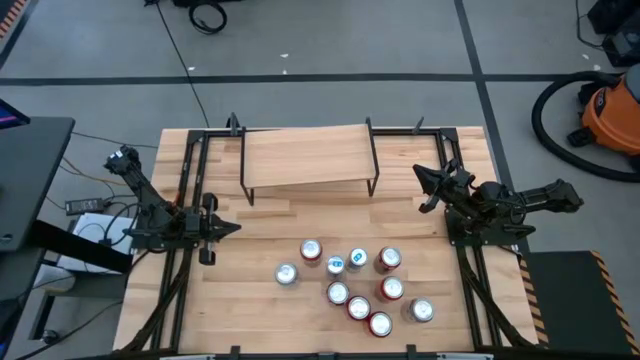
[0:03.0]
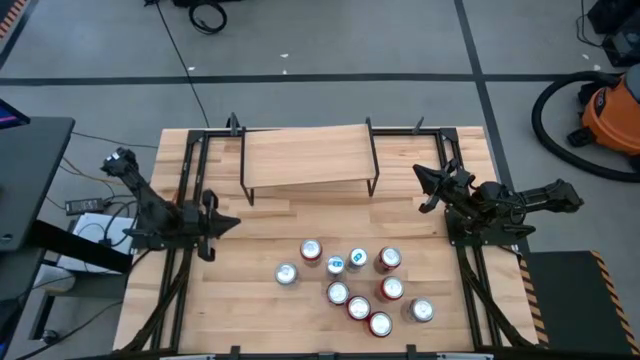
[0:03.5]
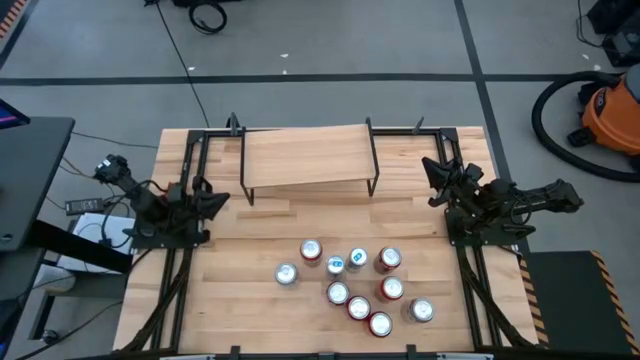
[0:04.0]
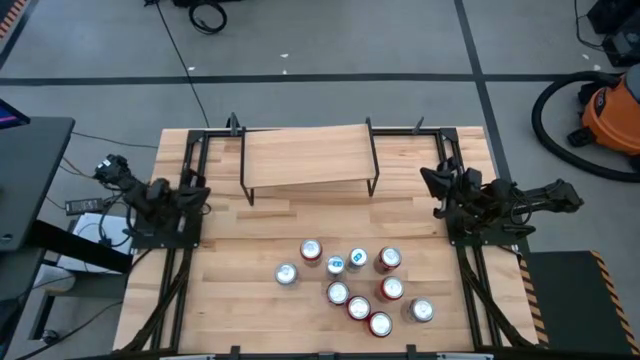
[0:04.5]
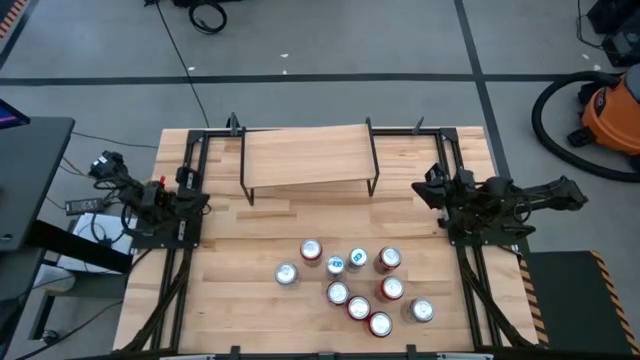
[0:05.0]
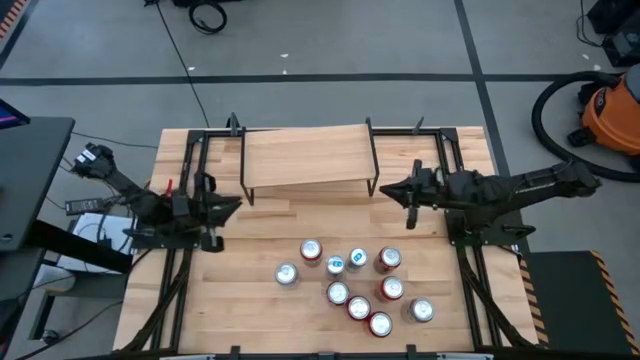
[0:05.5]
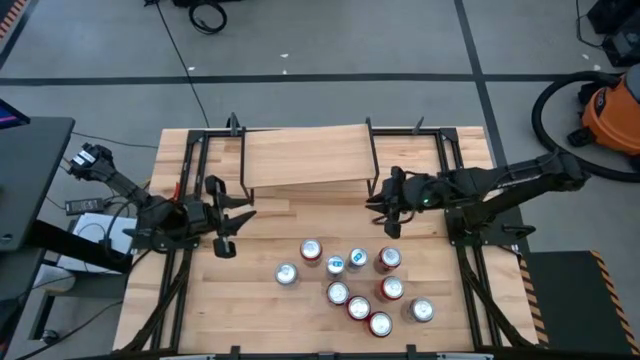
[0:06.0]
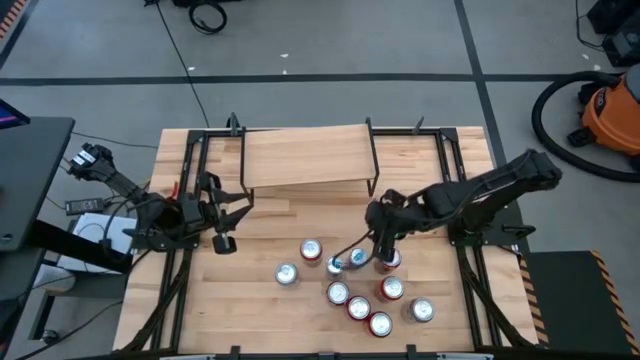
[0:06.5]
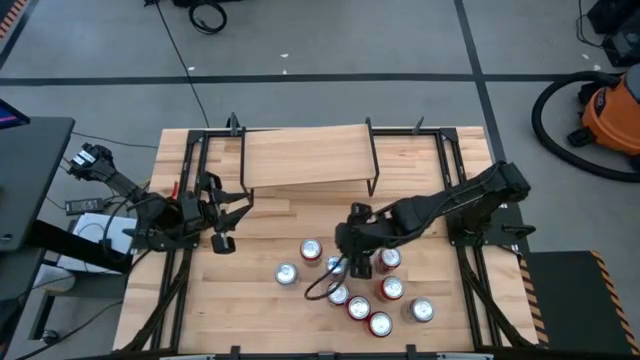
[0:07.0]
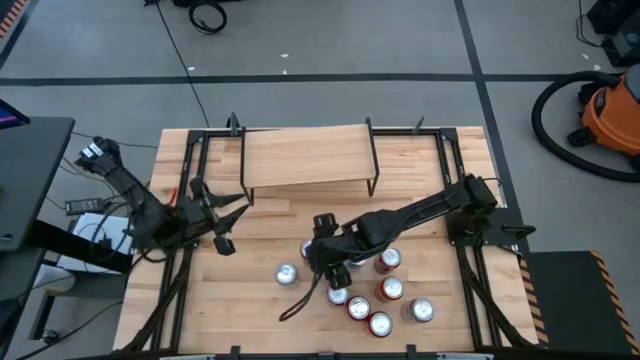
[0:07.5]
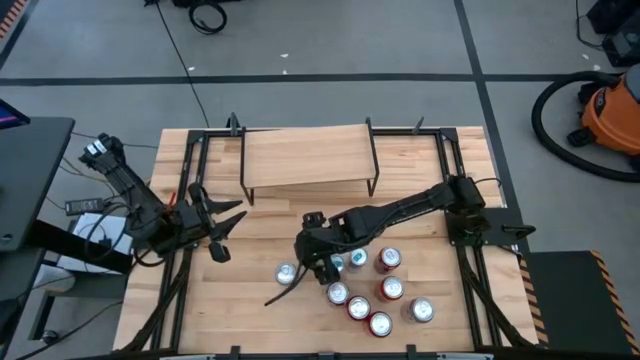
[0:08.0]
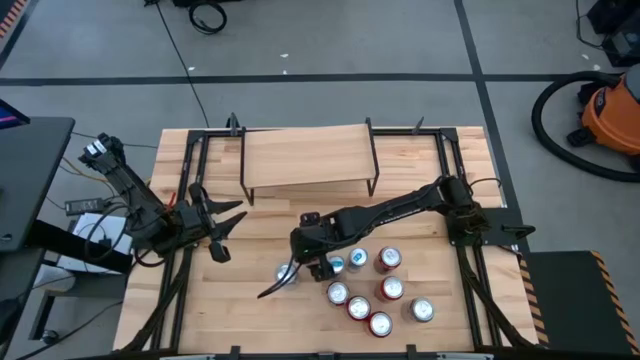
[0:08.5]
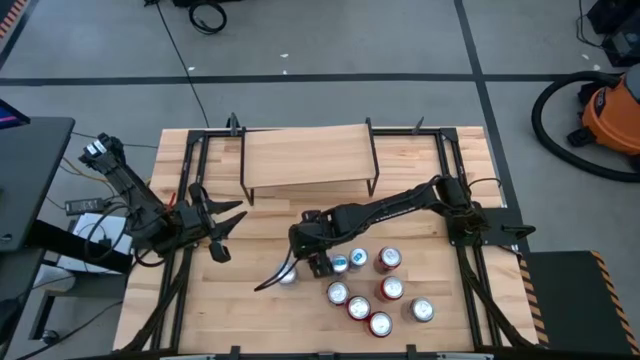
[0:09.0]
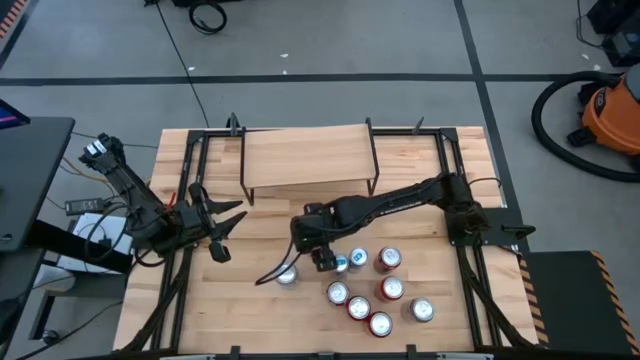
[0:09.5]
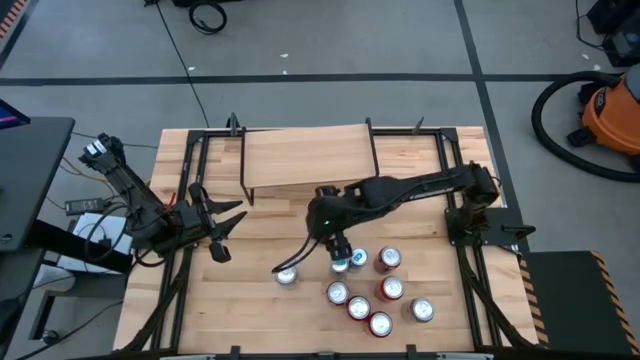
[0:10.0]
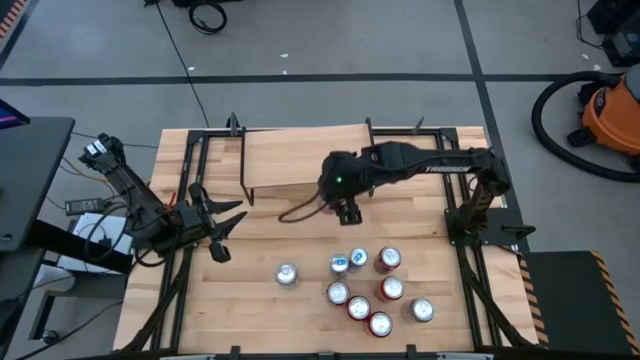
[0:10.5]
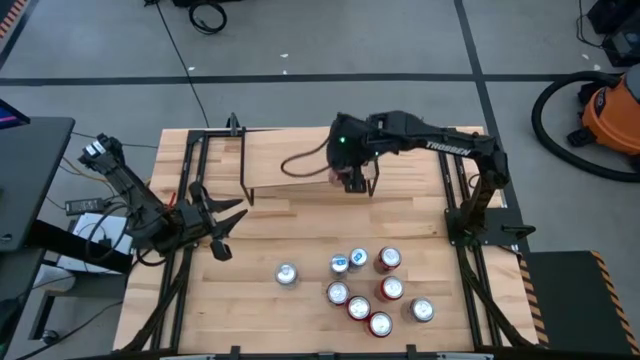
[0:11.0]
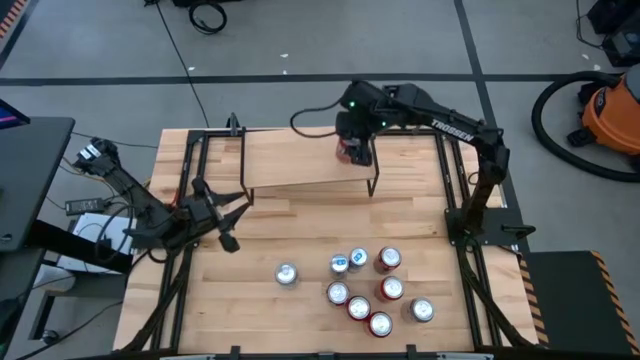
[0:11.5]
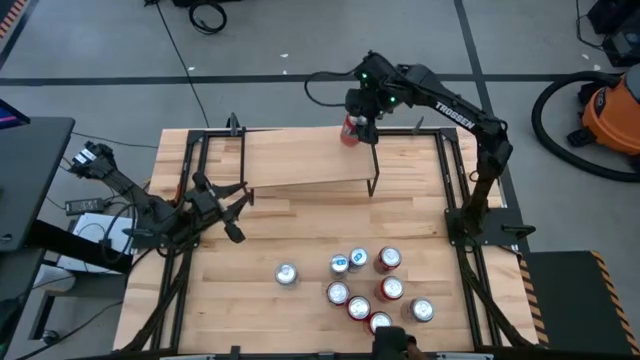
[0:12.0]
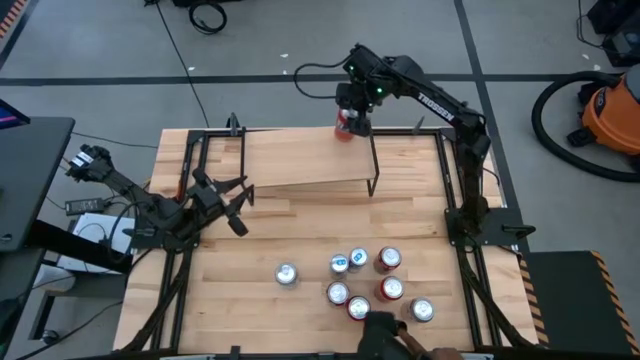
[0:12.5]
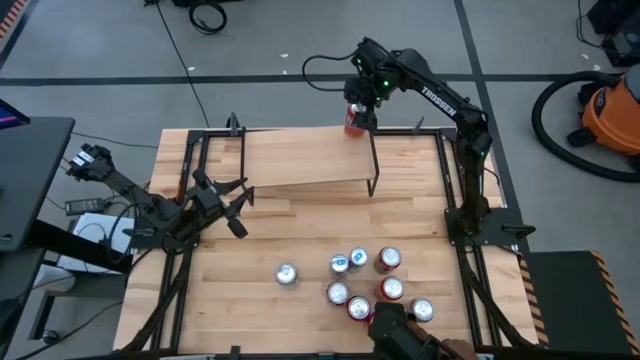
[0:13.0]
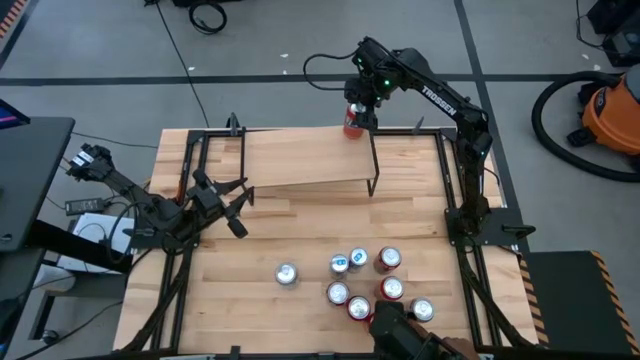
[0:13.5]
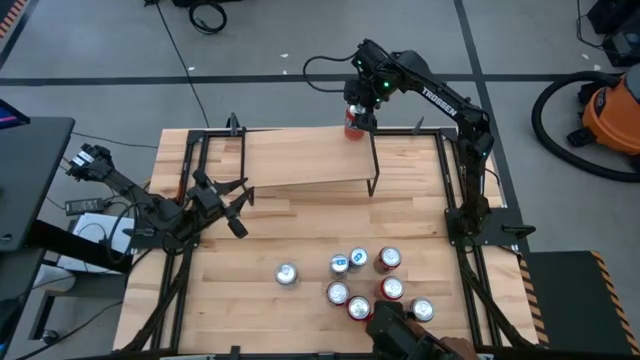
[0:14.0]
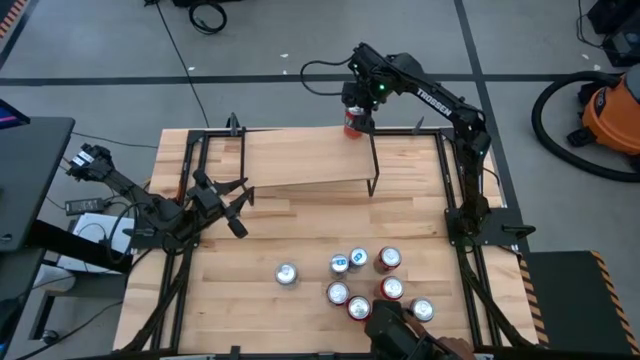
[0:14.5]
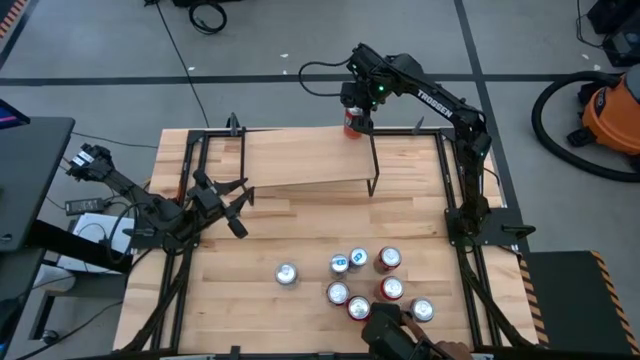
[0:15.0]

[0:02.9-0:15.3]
Task: Place canned beverage on shelf
Put the top orange soda can on the shelf

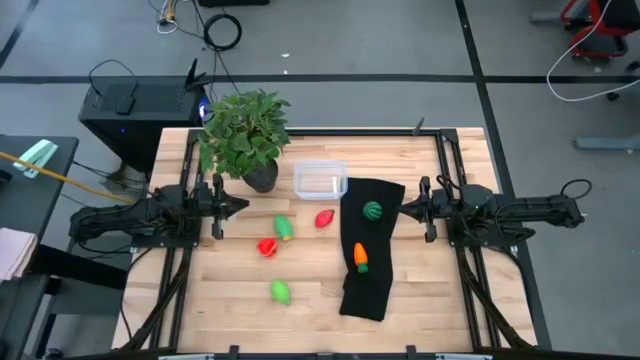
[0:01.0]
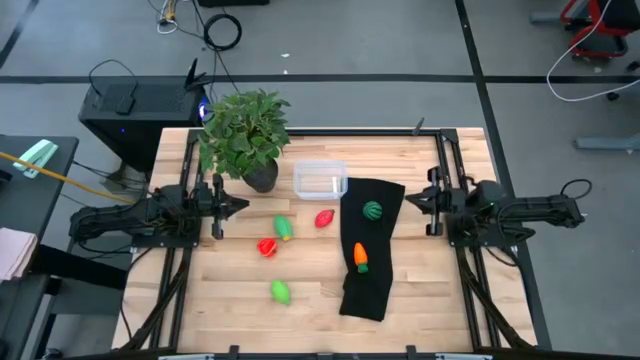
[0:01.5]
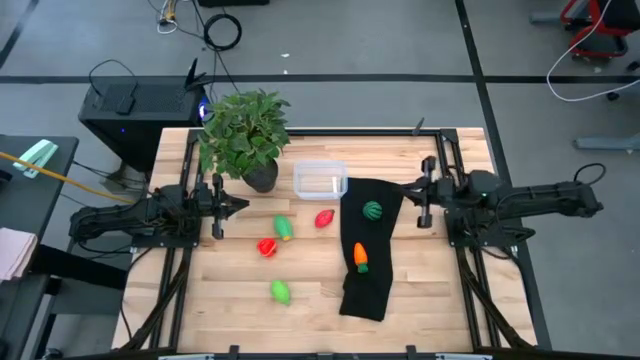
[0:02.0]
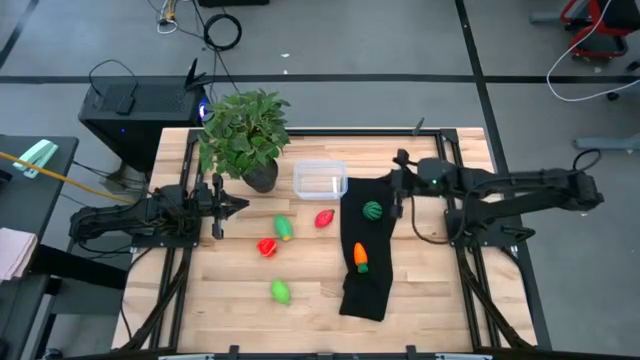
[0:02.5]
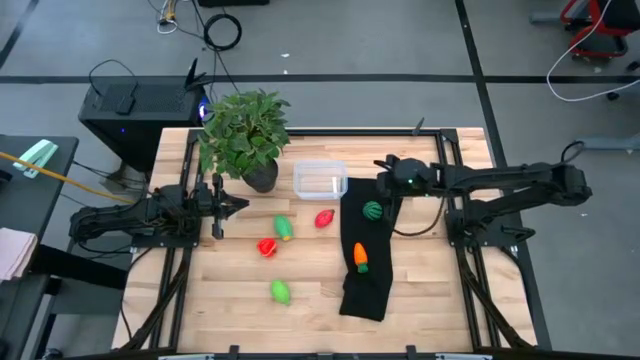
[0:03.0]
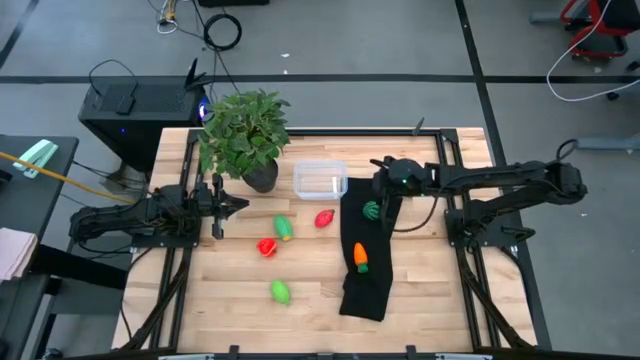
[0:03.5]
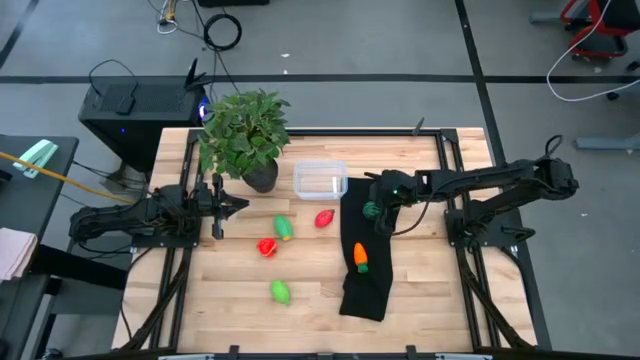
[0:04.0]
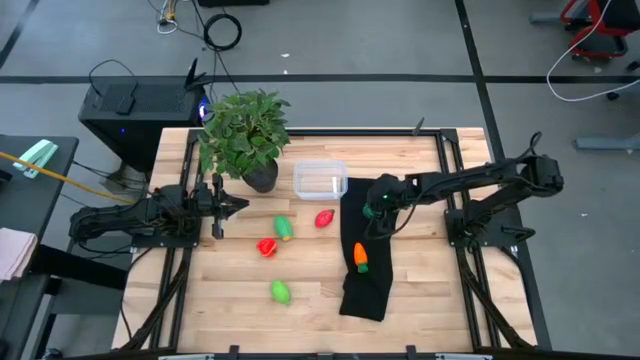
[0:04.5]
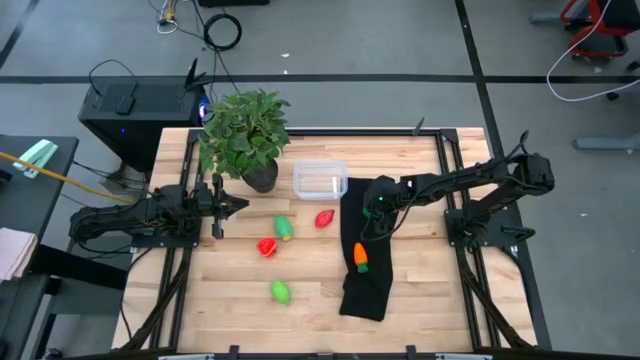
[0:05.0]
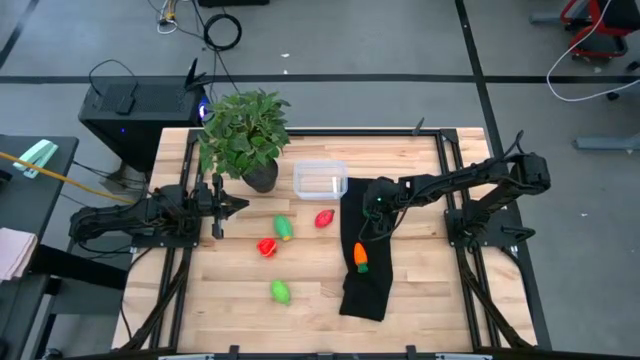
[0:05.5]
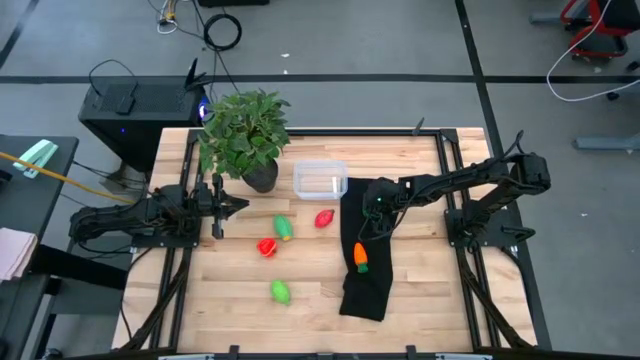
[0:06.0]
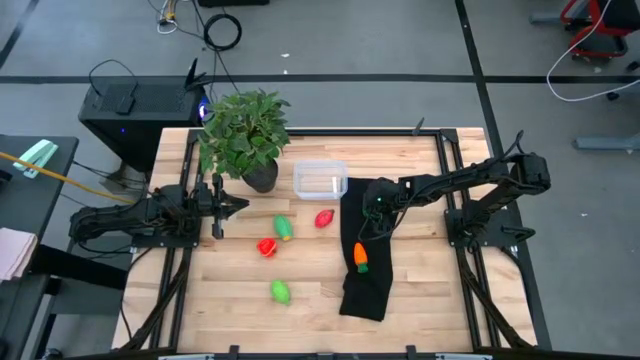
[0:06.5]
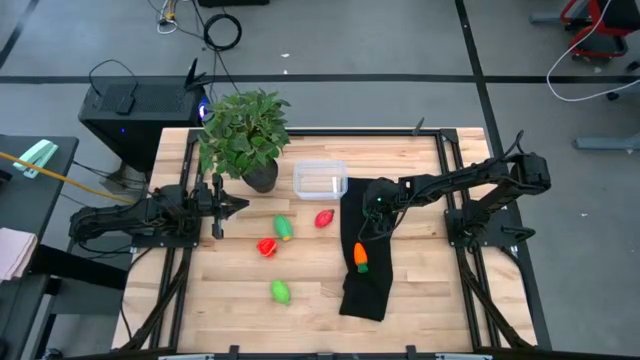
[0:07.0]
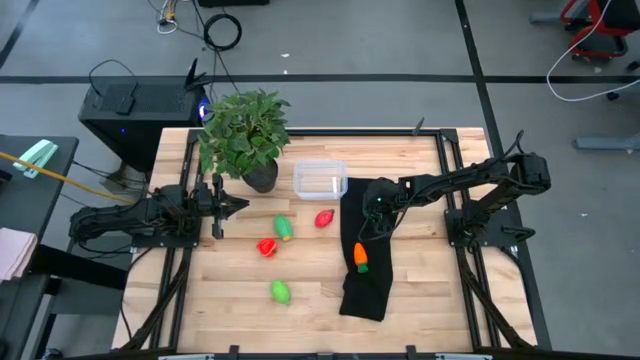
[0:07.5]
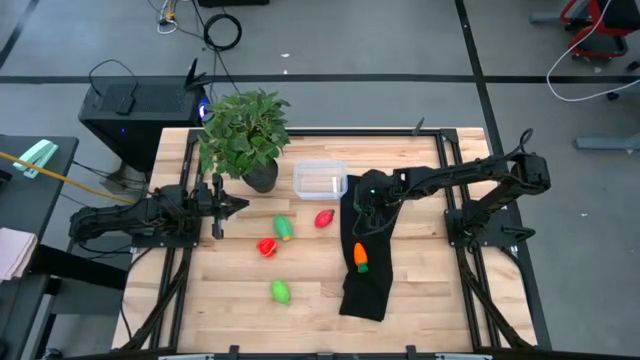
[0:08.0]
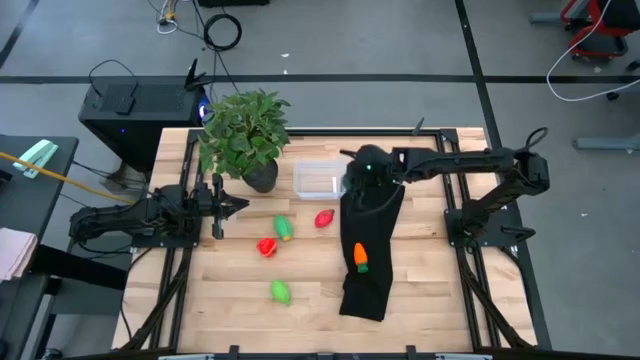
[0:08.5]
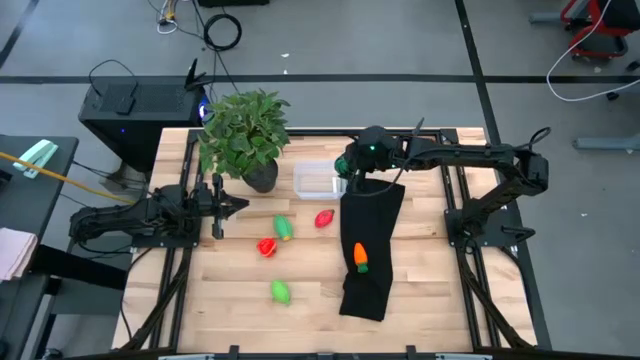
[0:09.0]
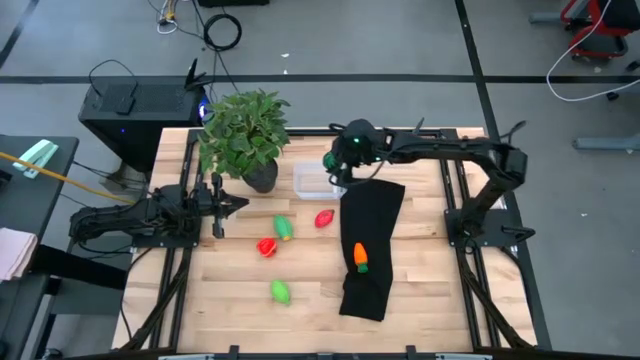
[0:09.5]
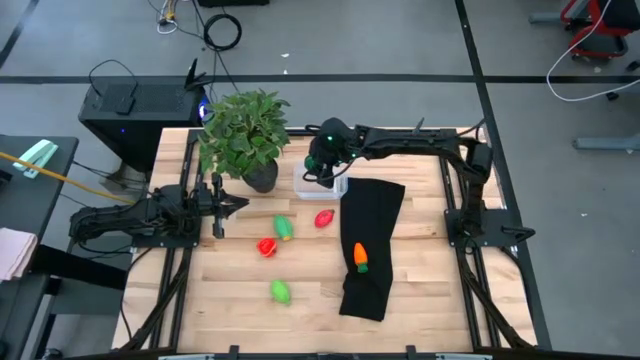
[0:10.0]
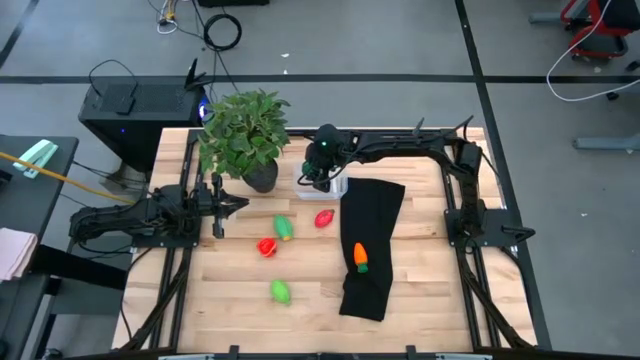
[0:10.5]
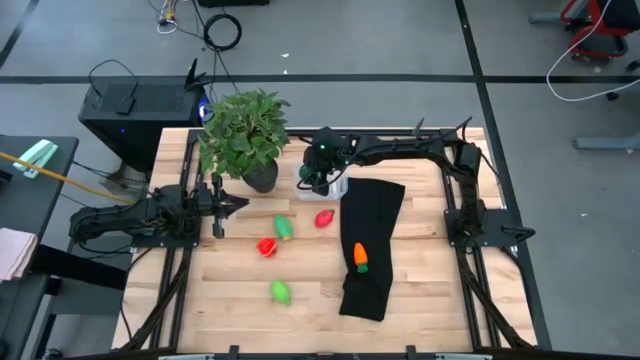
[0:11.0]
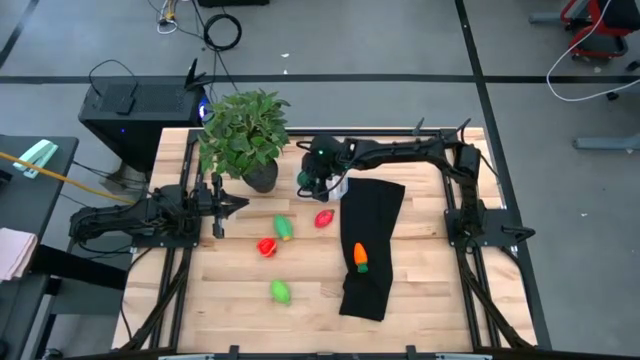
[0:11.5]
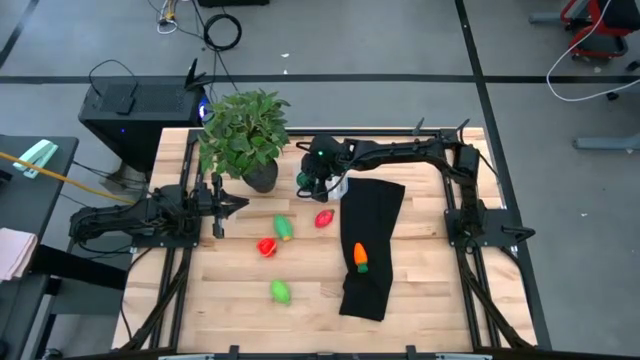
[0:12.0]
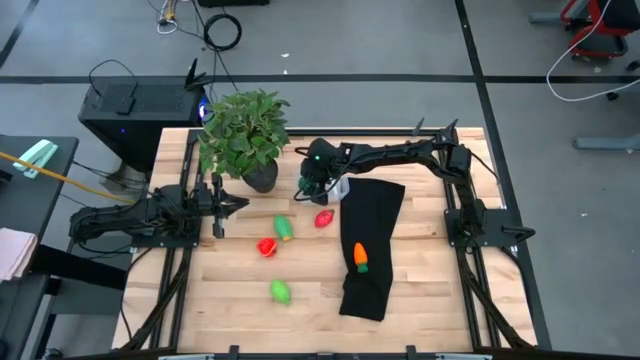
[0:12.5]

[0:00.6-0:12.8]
Task: Pick and placing Produce into tupperware
Put the green watermelon into the transparent bin
